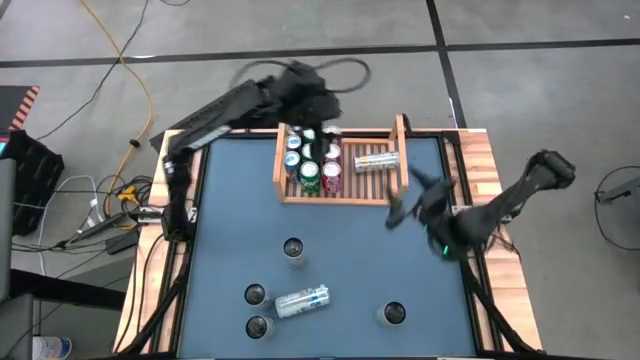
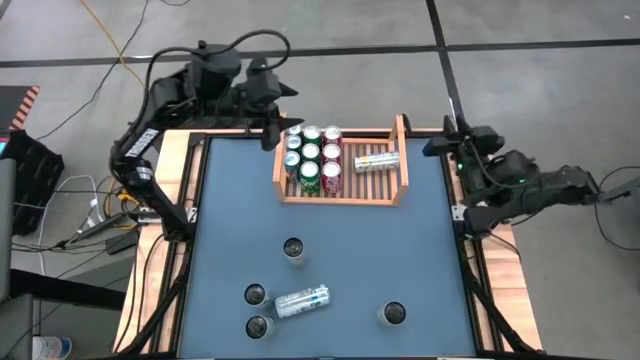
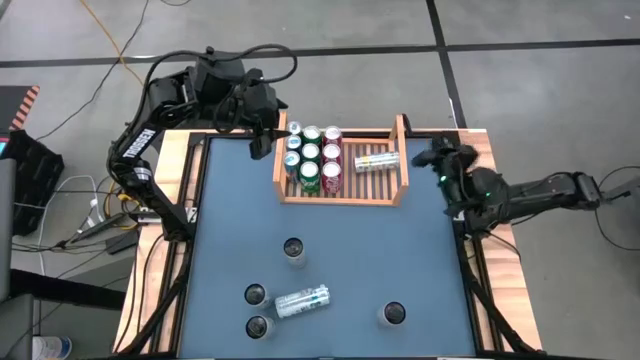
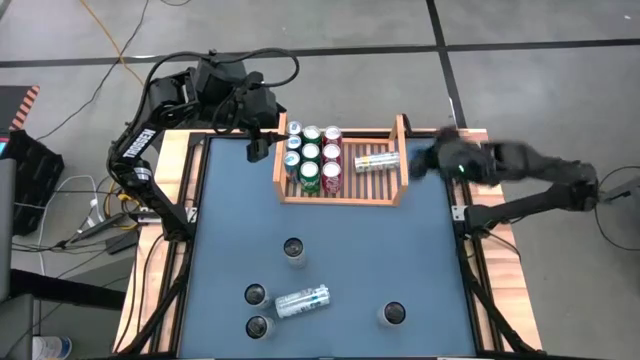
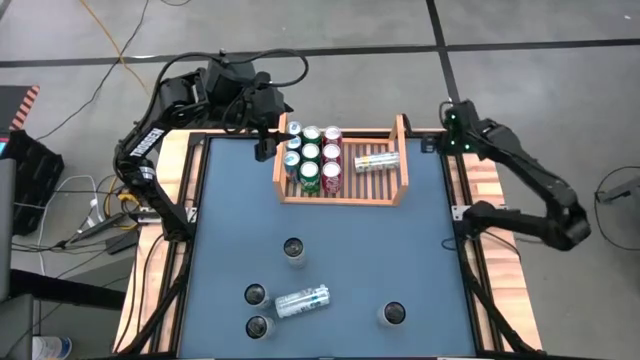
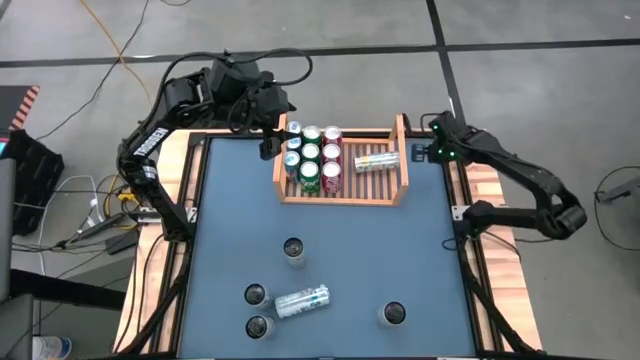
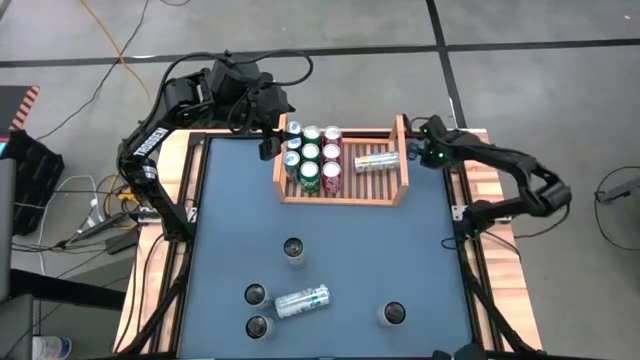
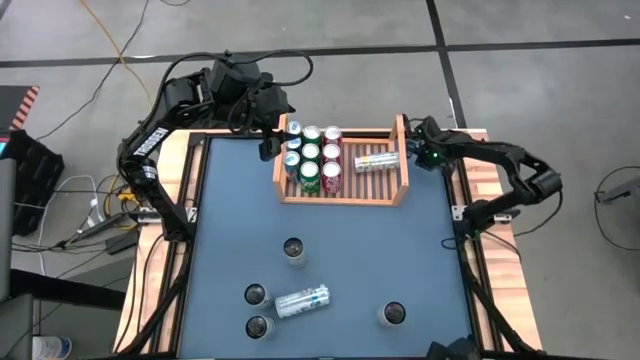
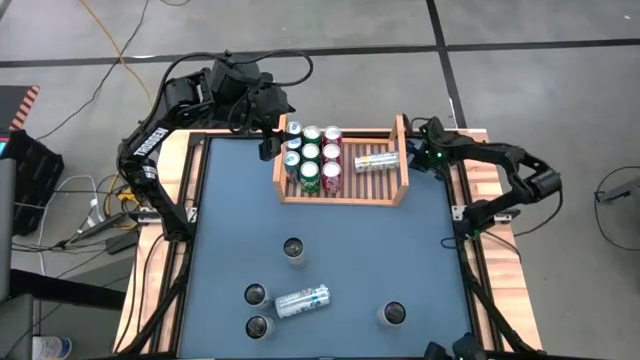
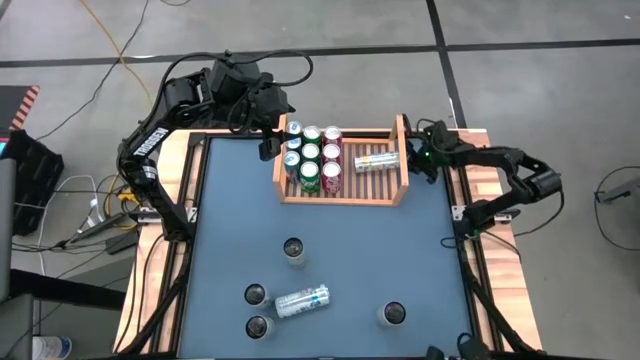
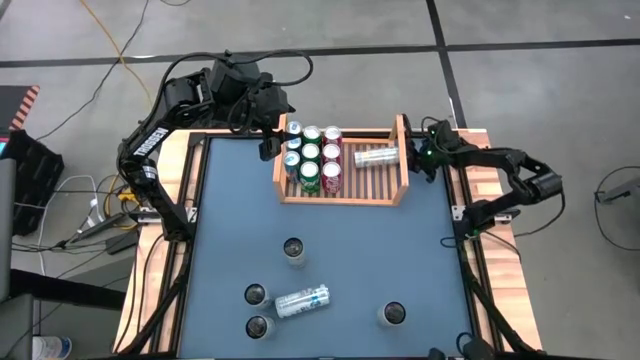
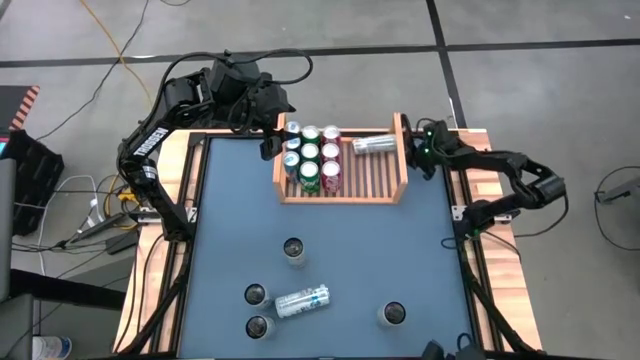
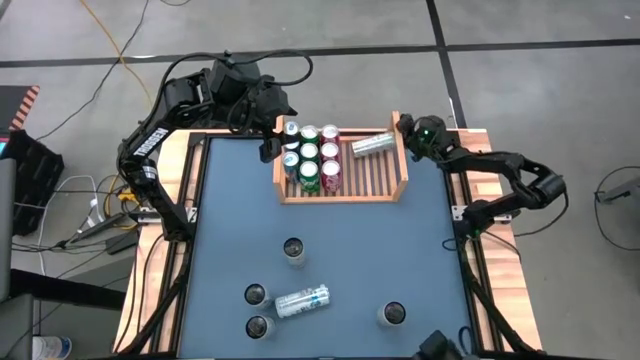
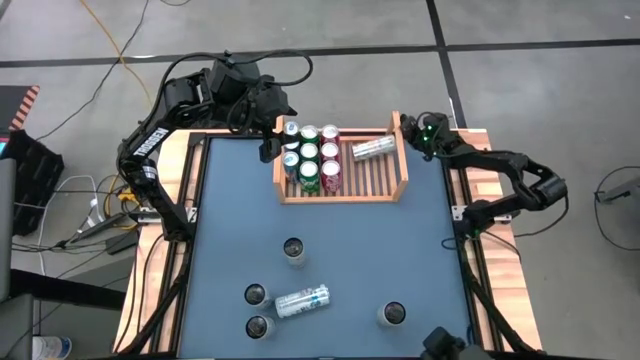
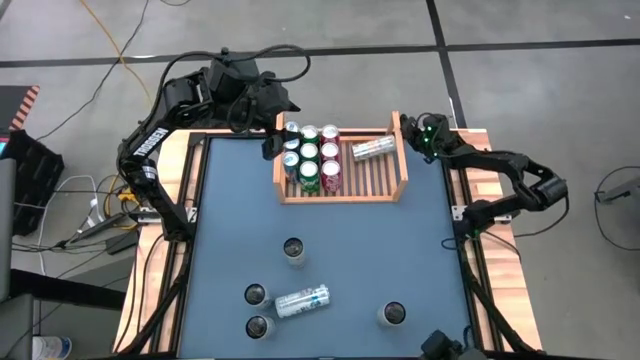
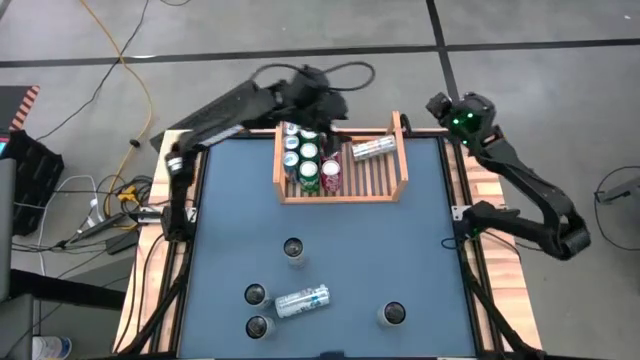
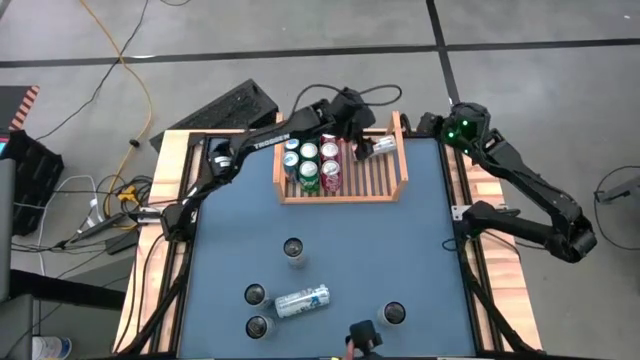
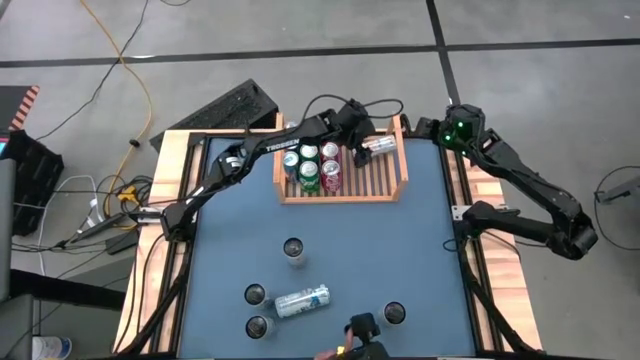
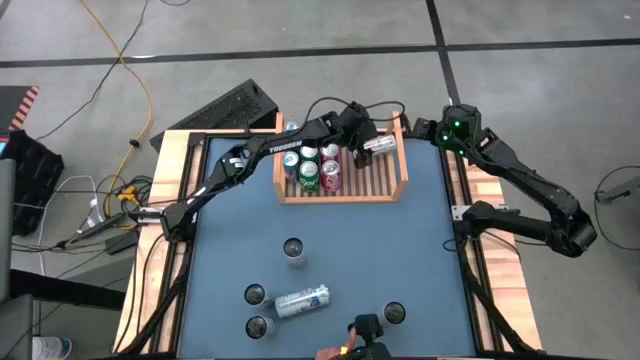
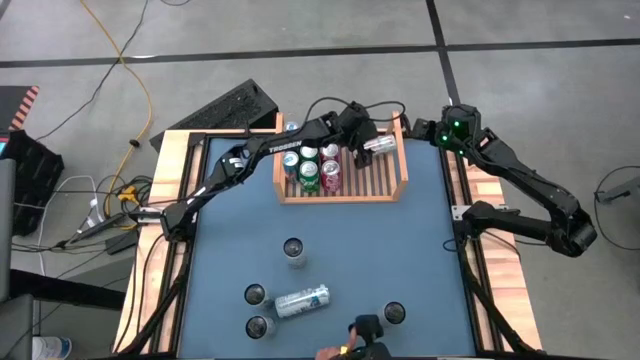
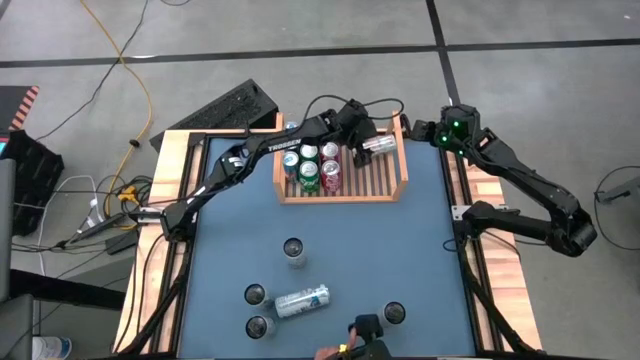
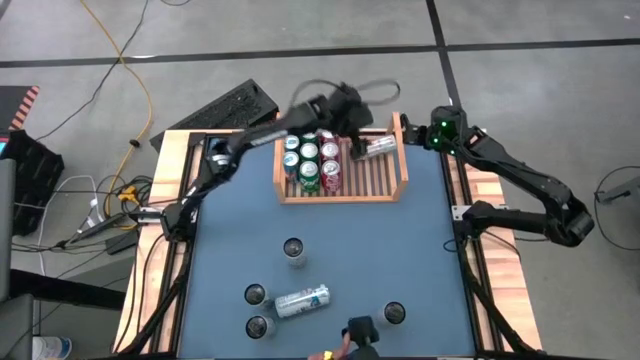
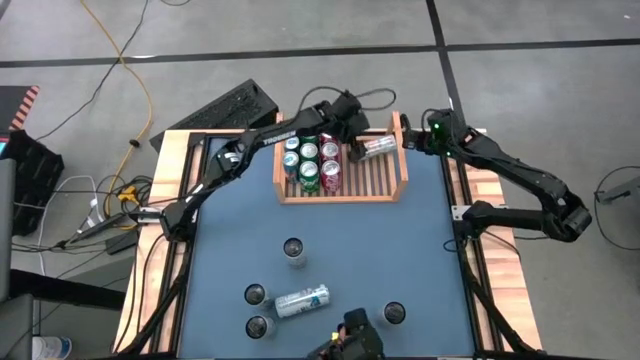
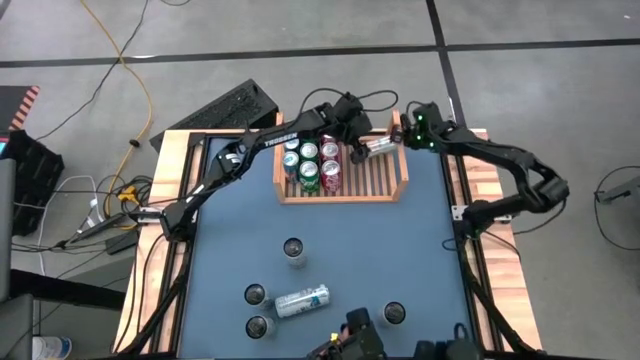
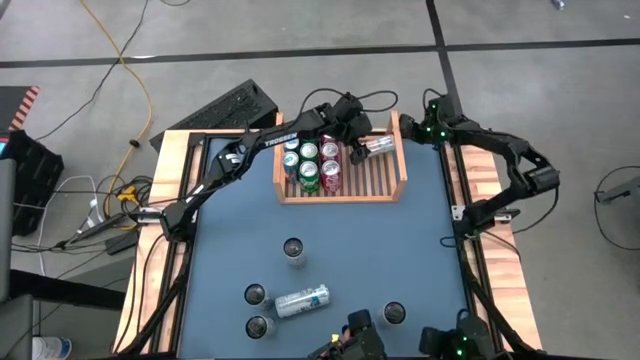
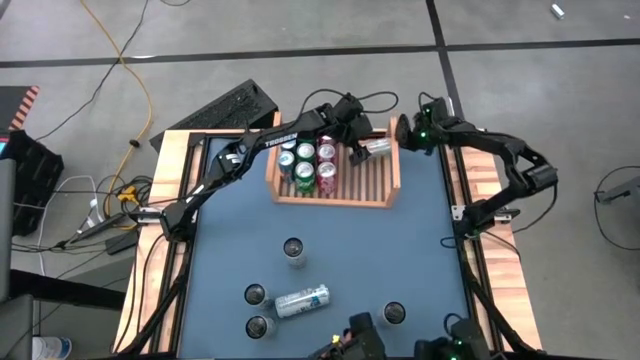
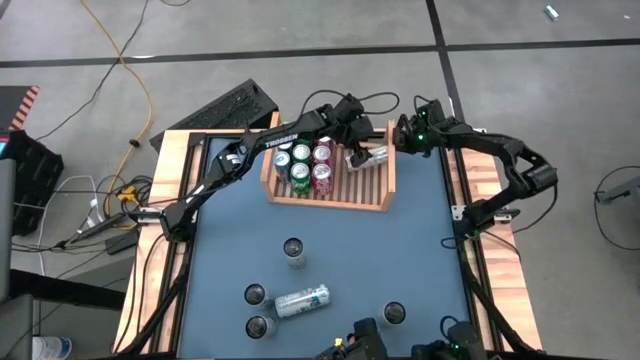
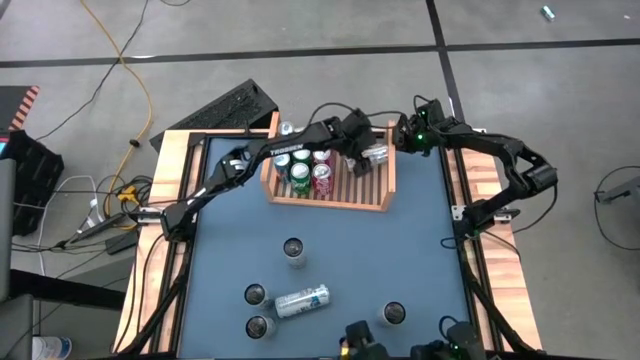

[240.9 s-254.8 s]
Task: Place canned beverage on shelf
Put the light yellow soda can on the shelf

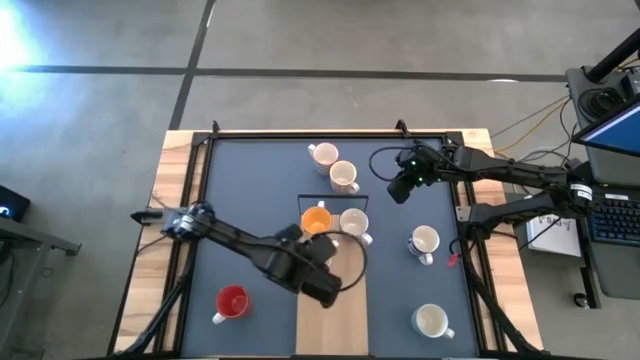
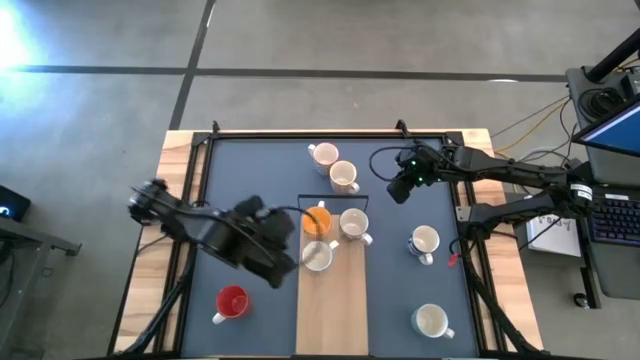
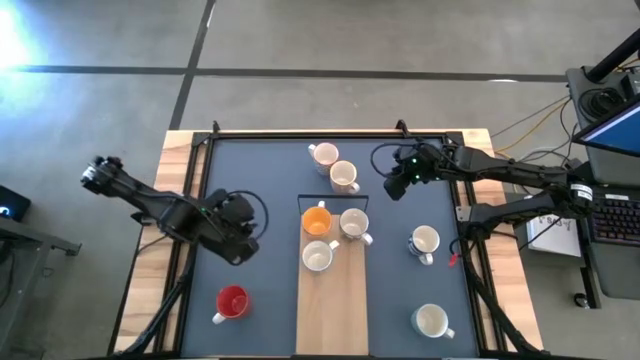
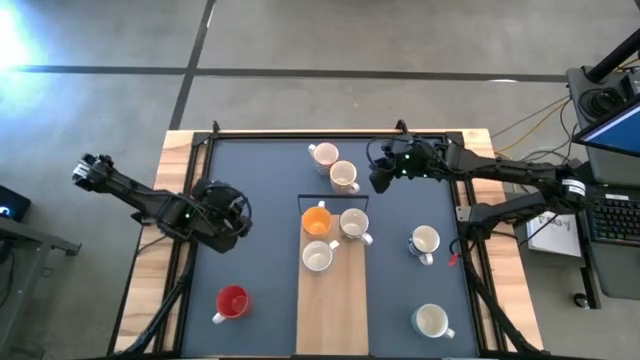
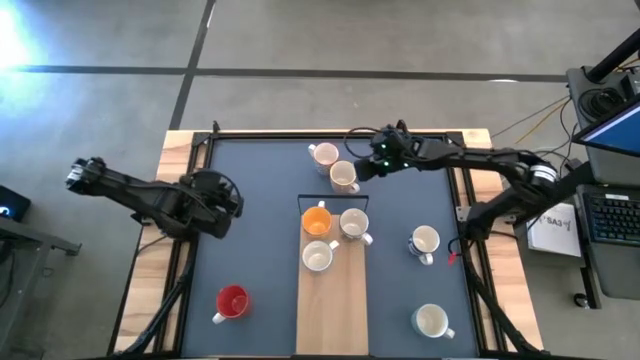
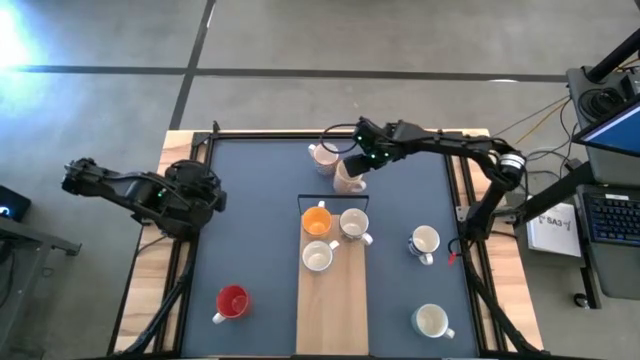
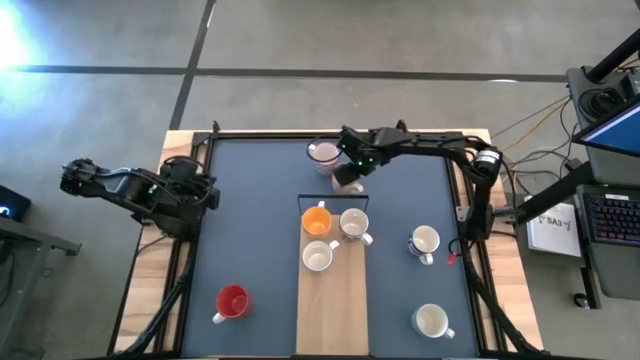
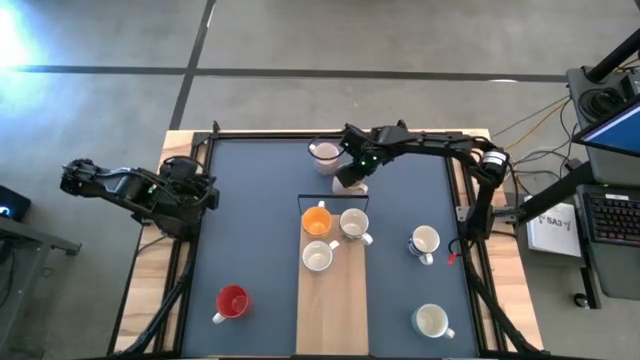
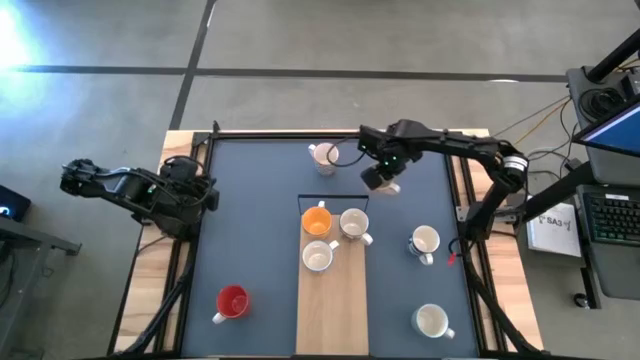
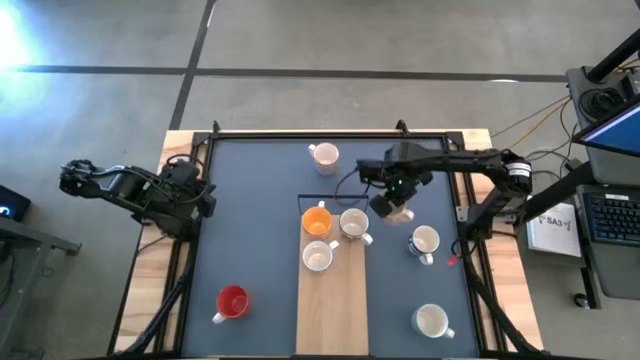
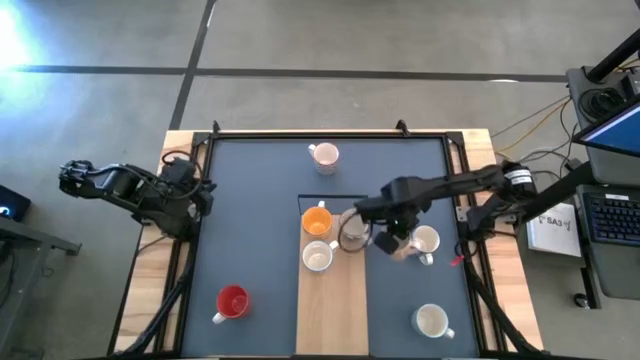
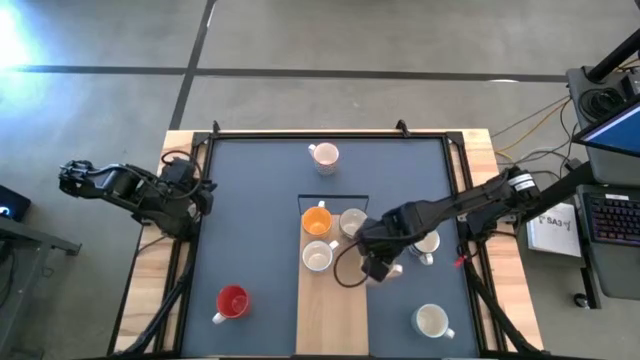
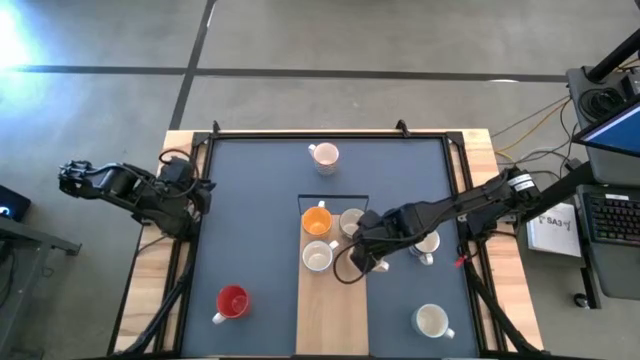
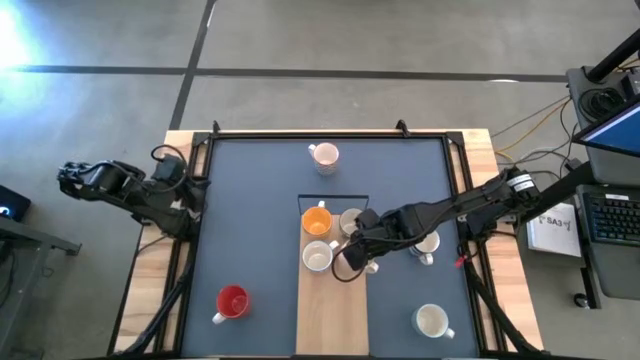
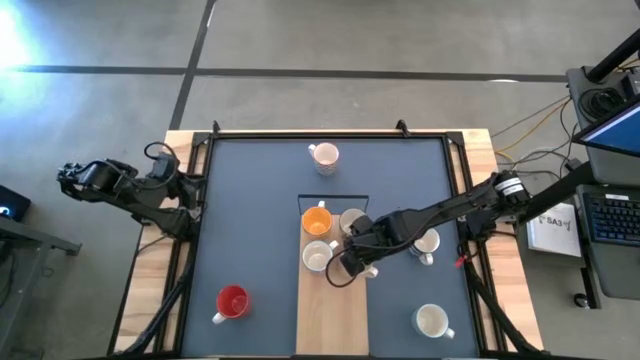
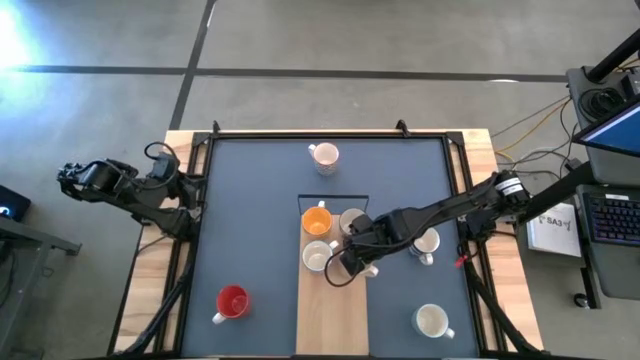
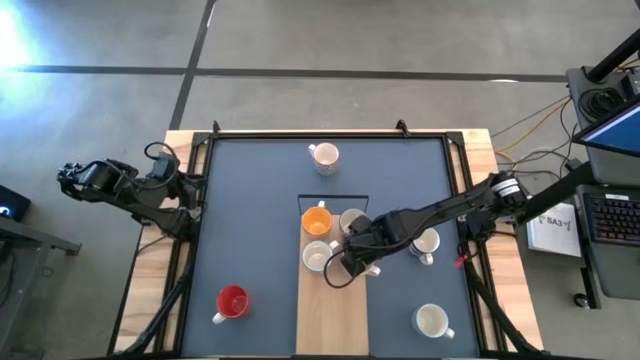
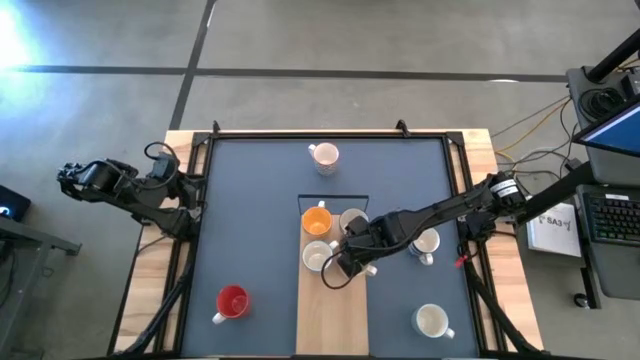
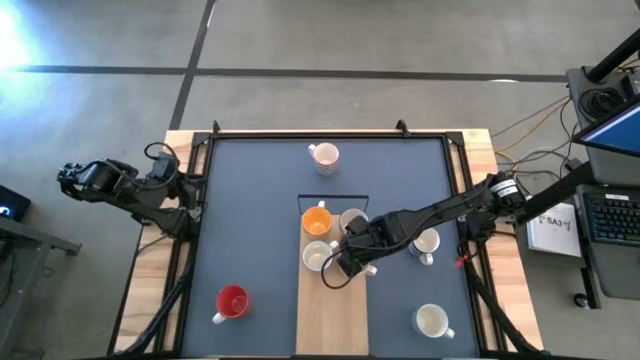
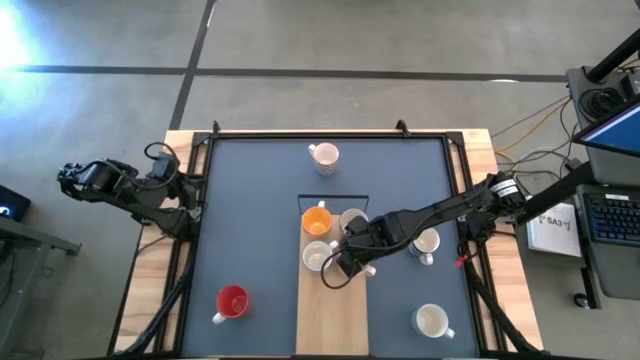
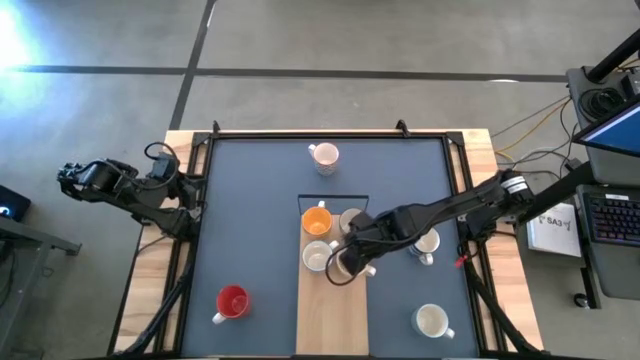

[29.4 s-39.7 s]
Task: Place coffee mugs
Put the orange mug on the shelf
